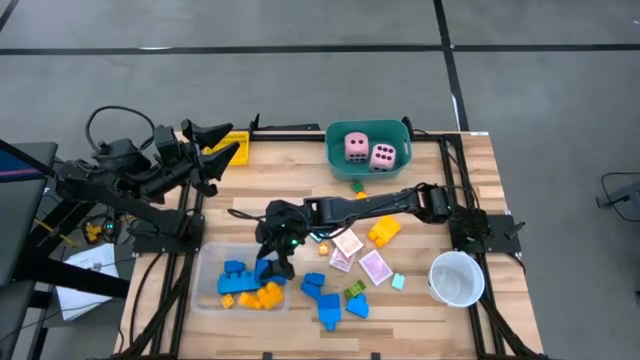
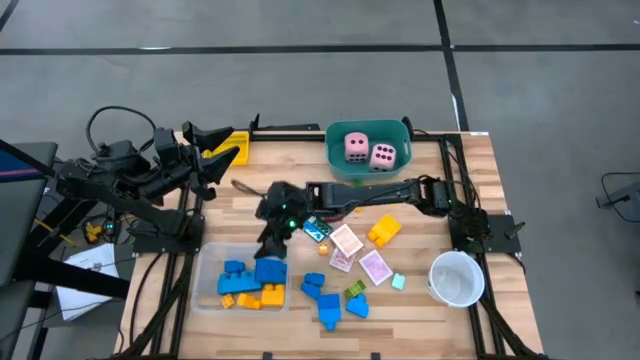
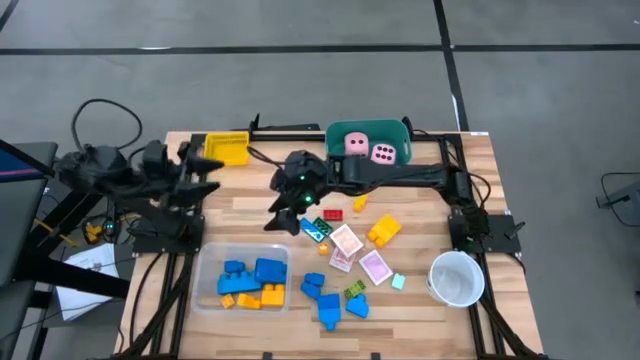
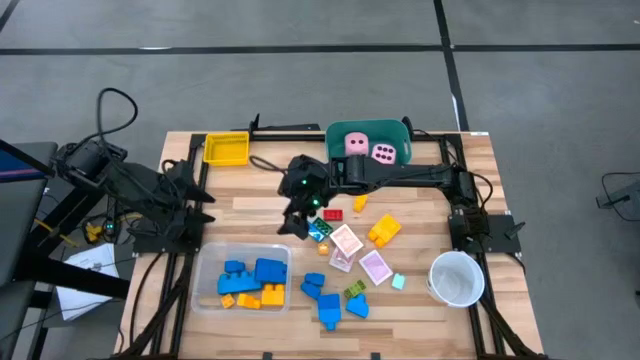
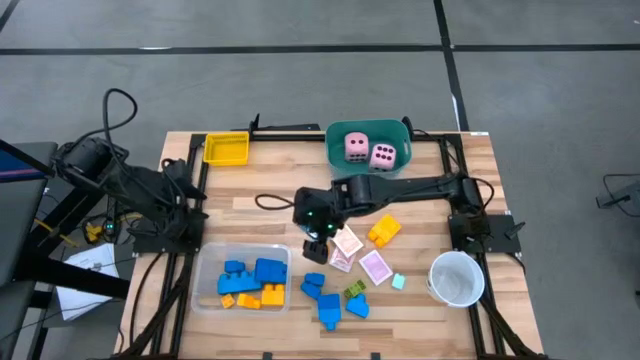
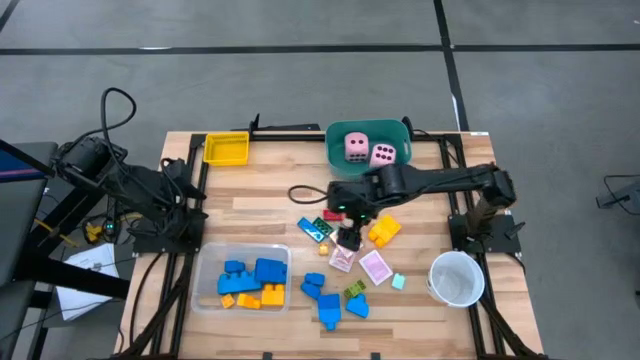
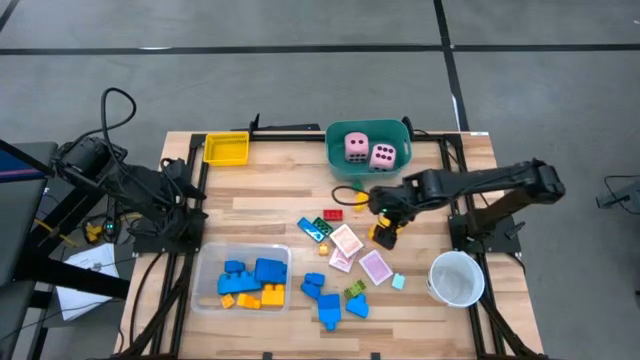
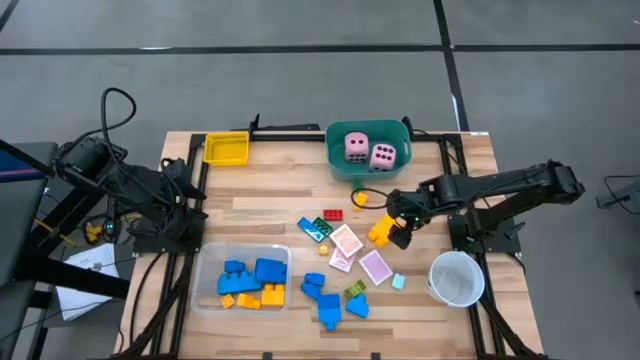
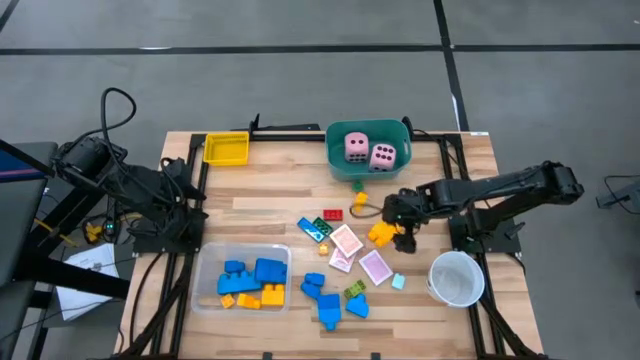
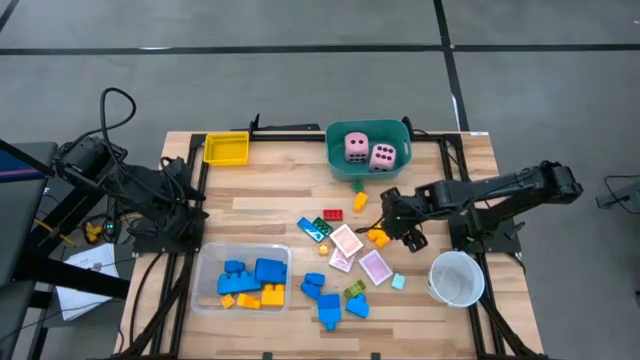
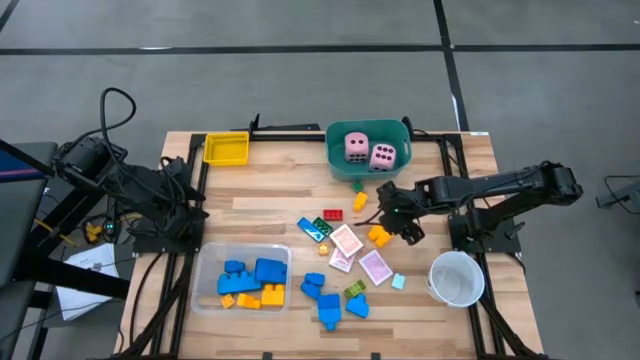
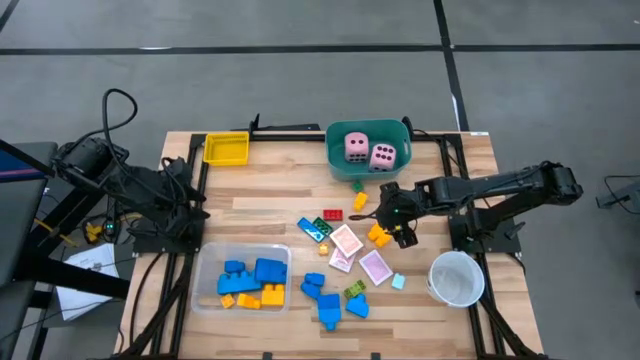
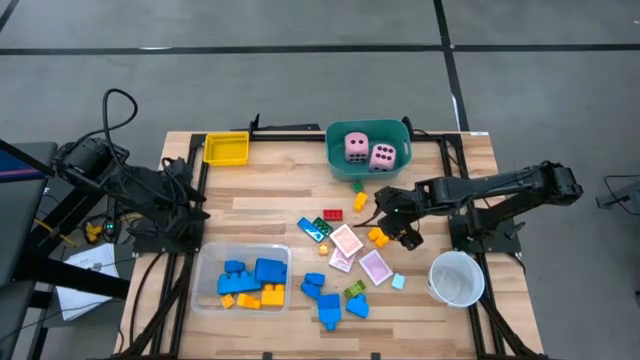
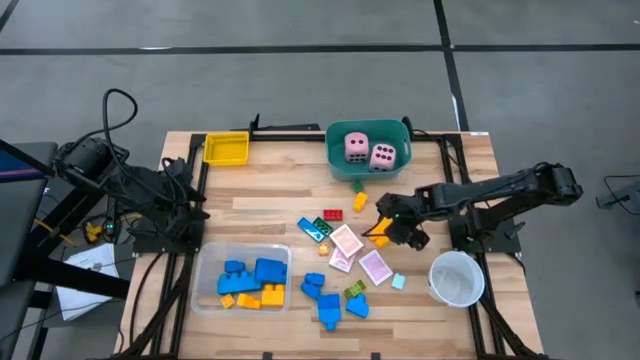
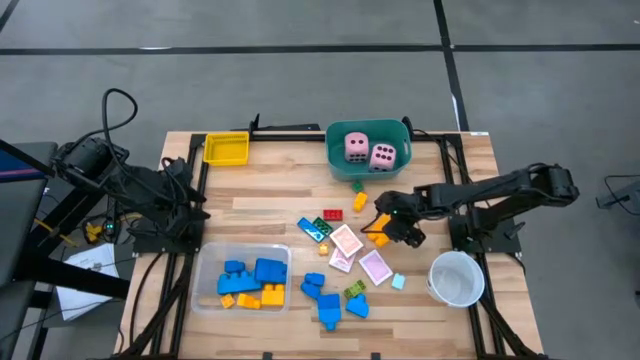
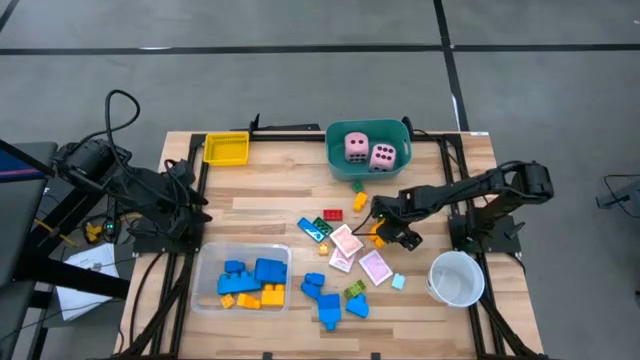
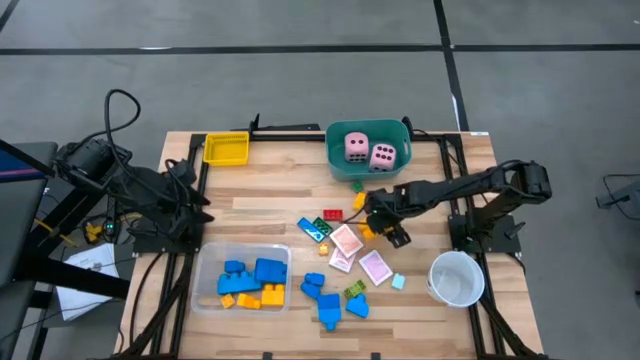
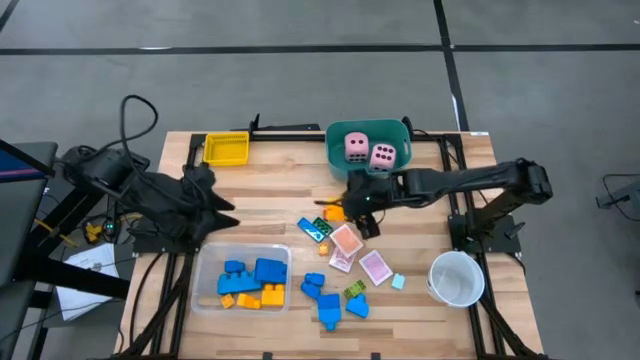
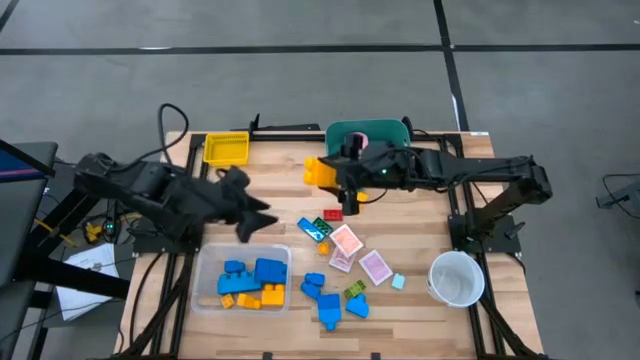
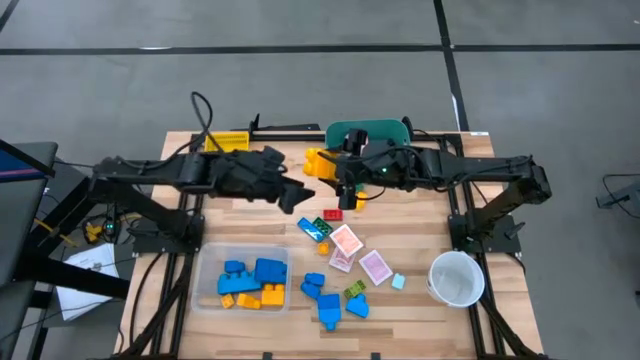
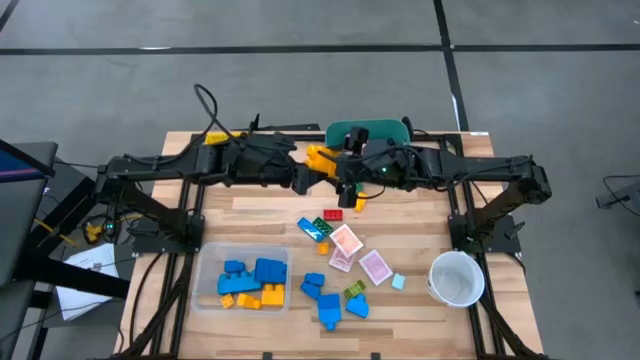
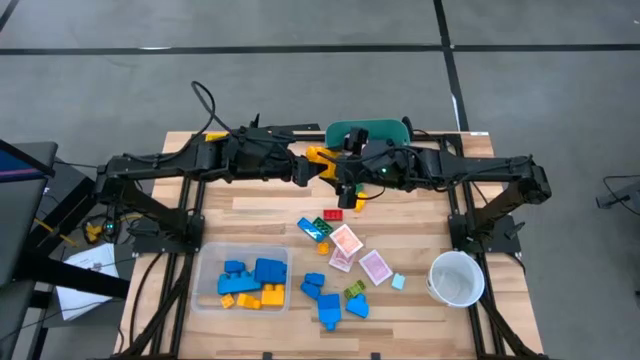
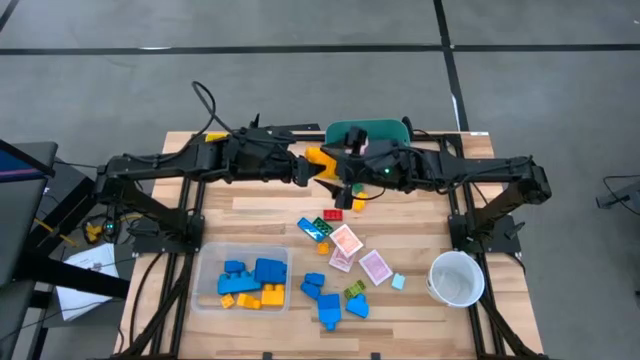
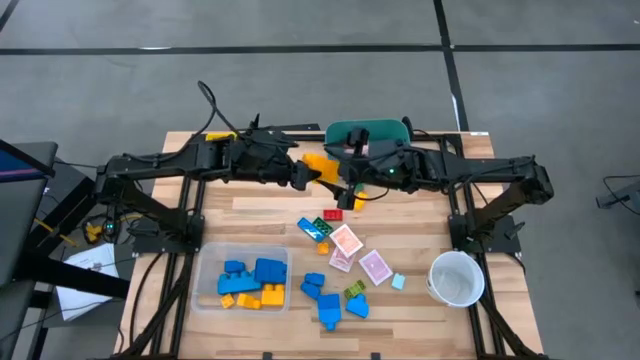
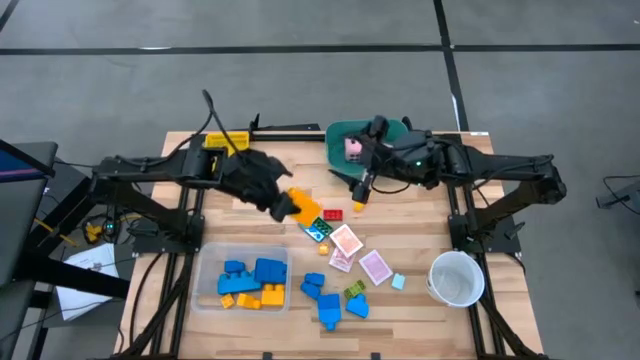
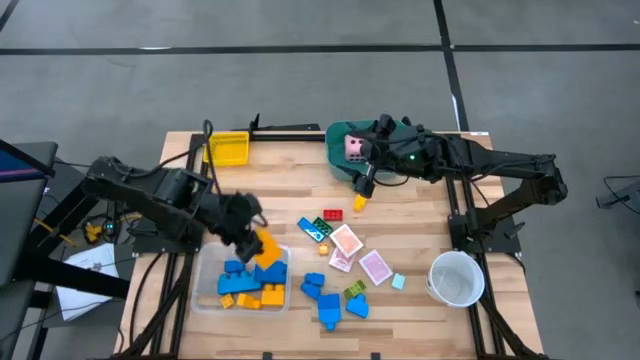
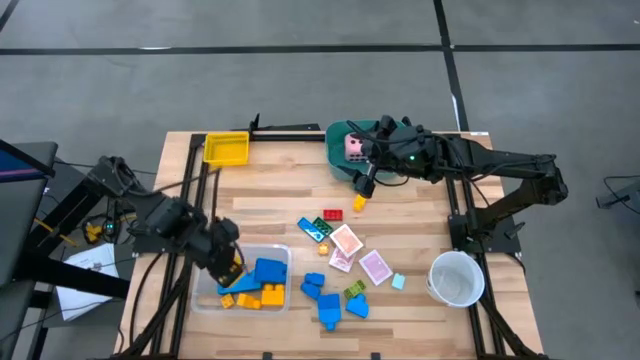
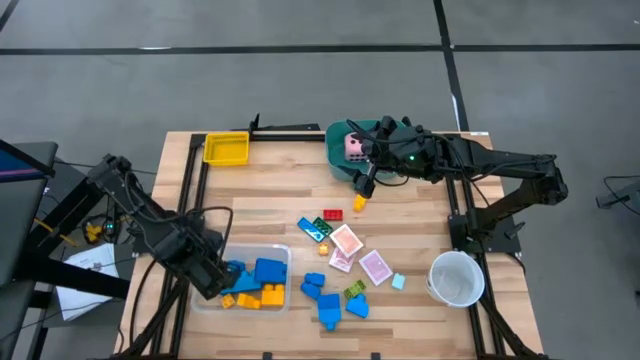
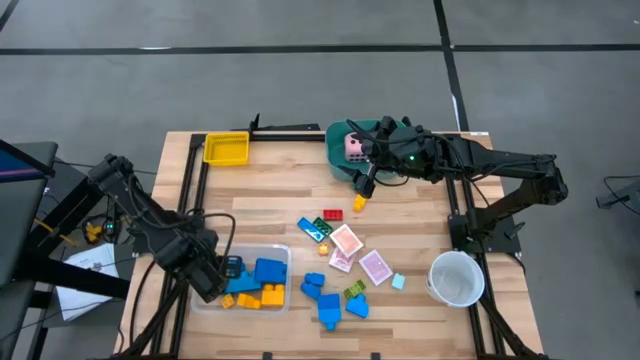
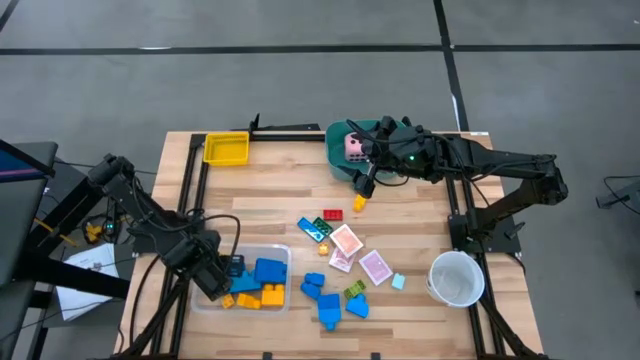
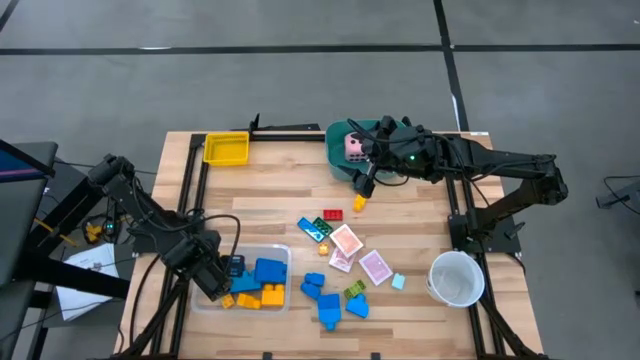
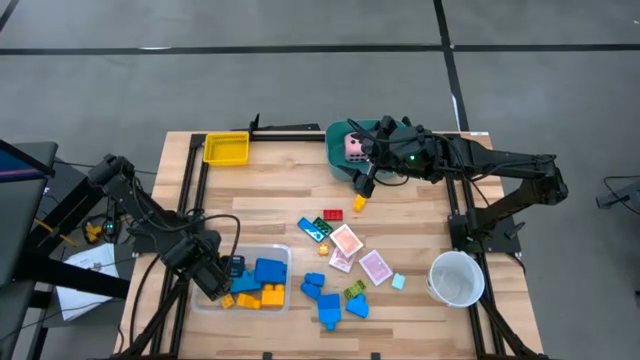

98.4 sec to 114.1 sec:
Task: Pick & Place Toys
Put the yellow game pieces into the transparent bin

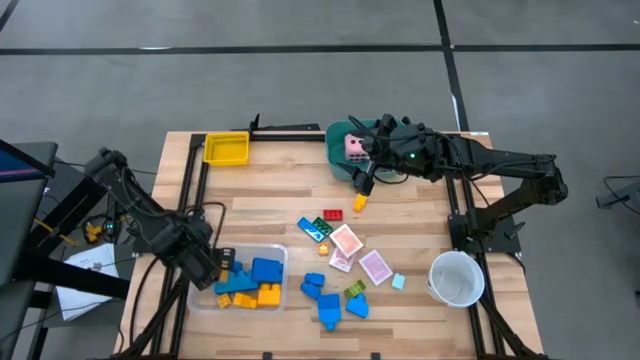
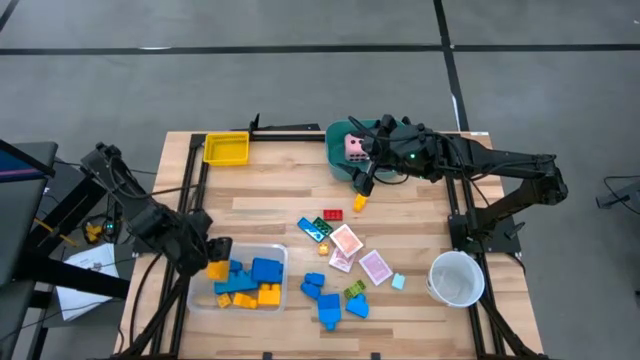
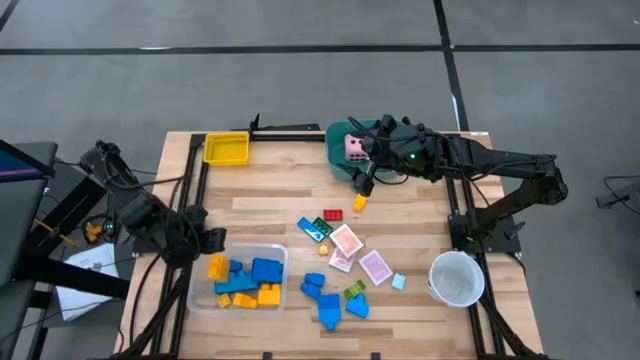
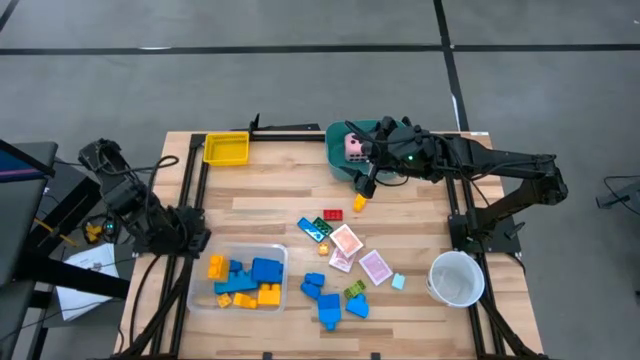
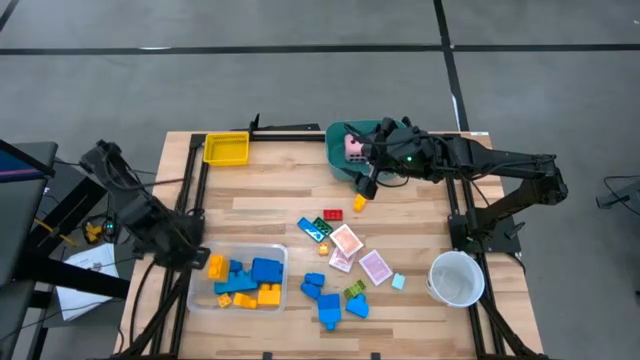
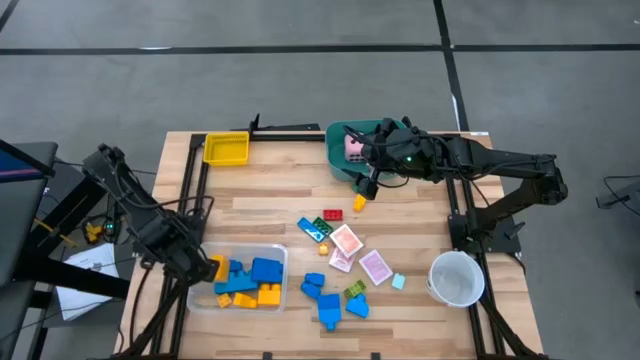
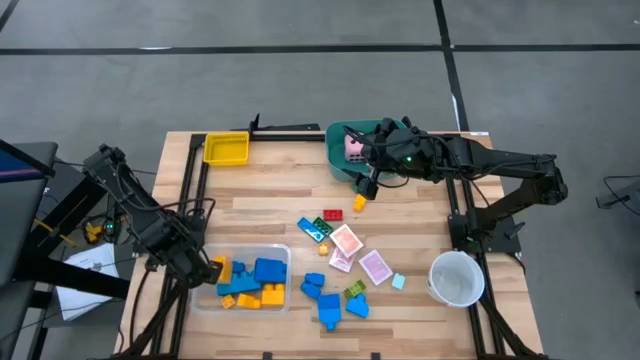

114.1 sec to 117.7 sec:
Adjust the transparent bin on the table

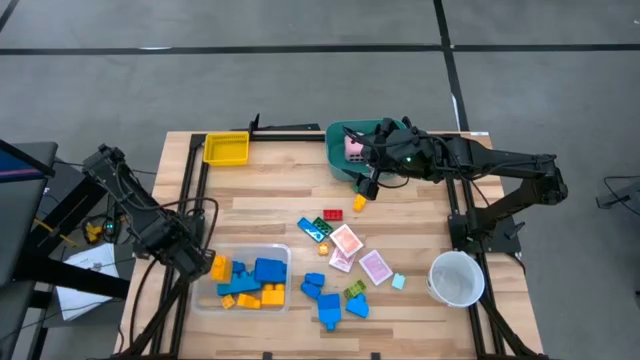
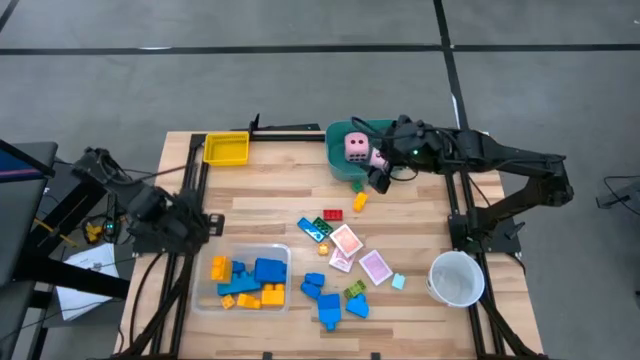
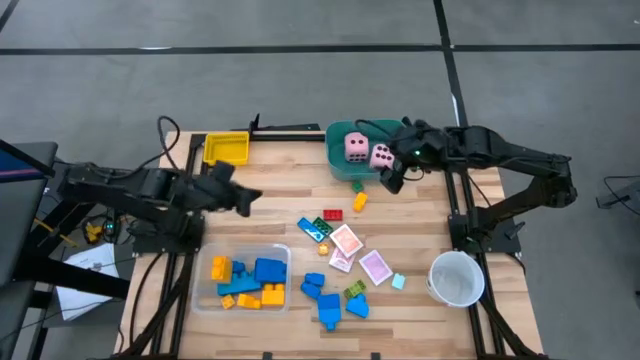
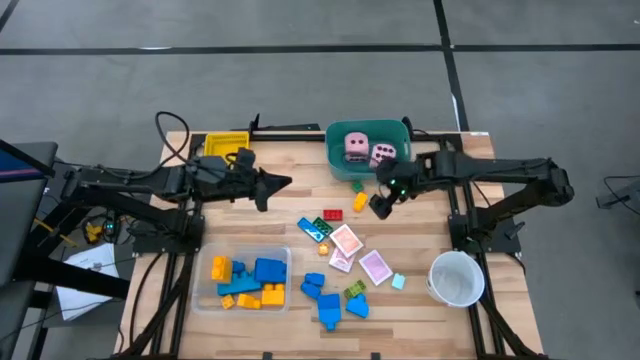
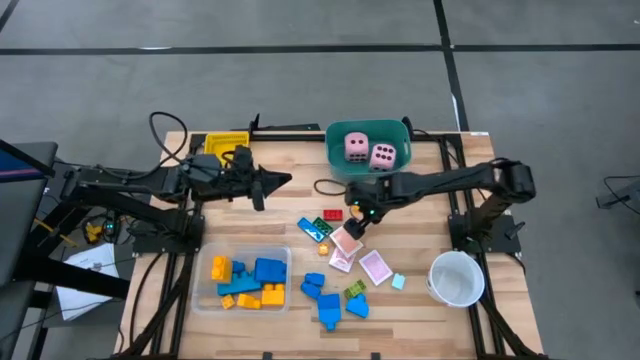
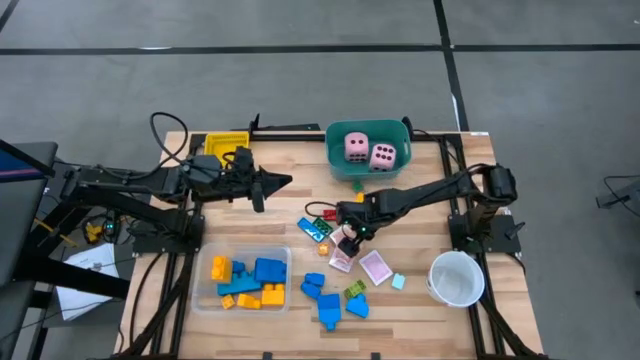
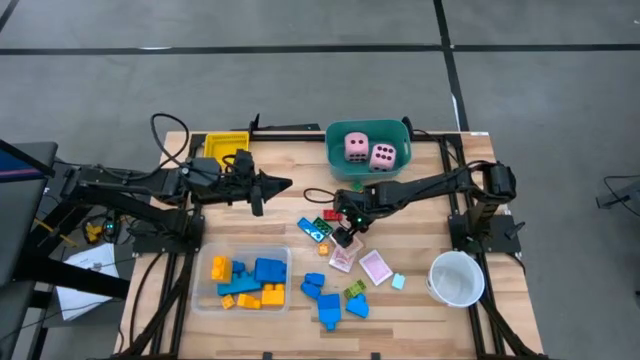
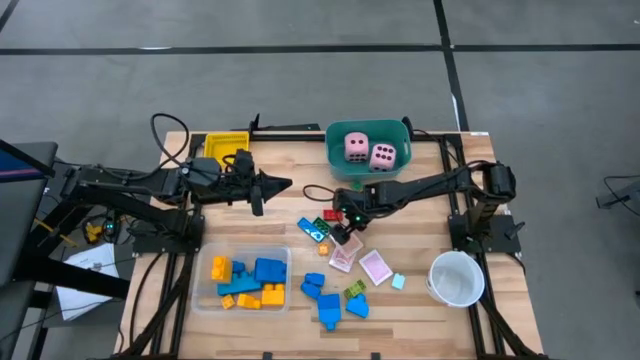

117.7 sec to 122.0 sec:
Put the orange playing card into the yellow bin
